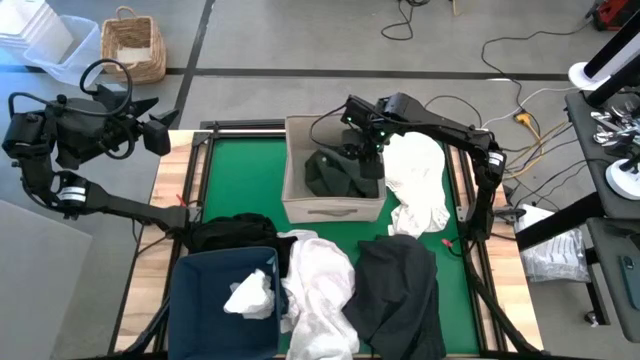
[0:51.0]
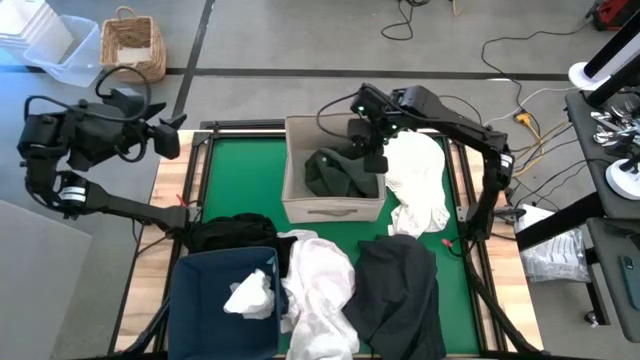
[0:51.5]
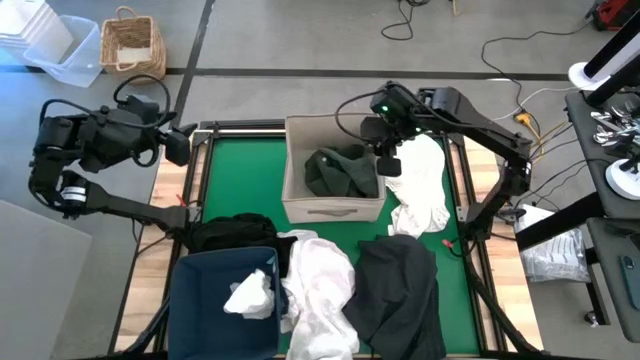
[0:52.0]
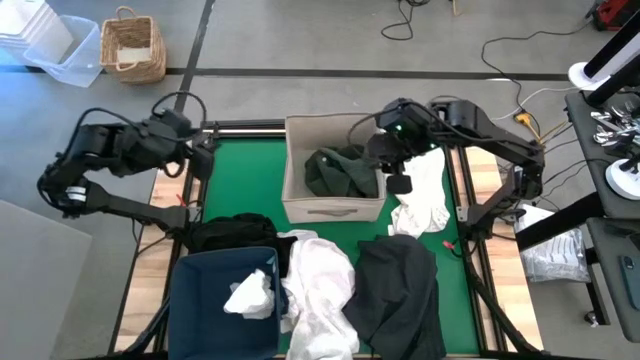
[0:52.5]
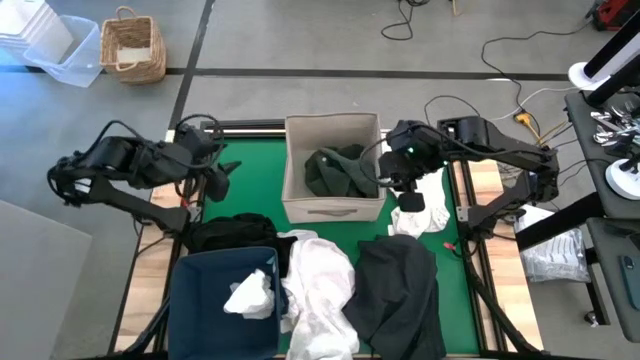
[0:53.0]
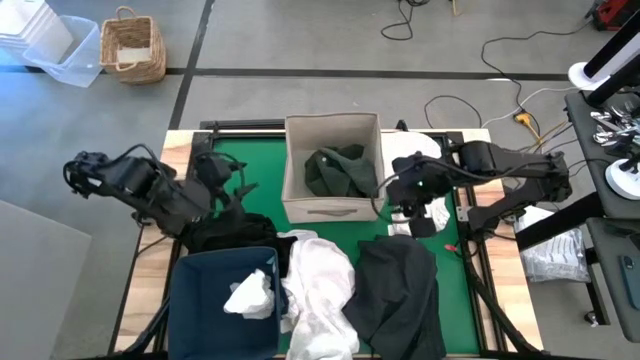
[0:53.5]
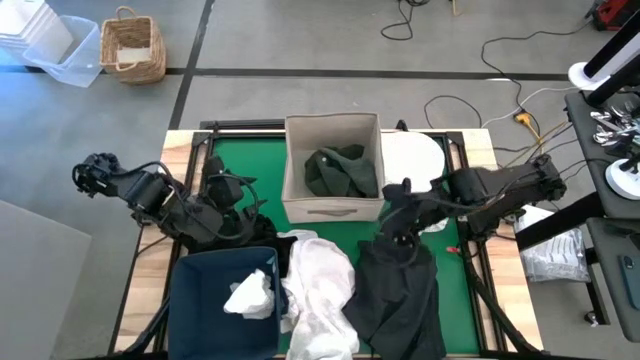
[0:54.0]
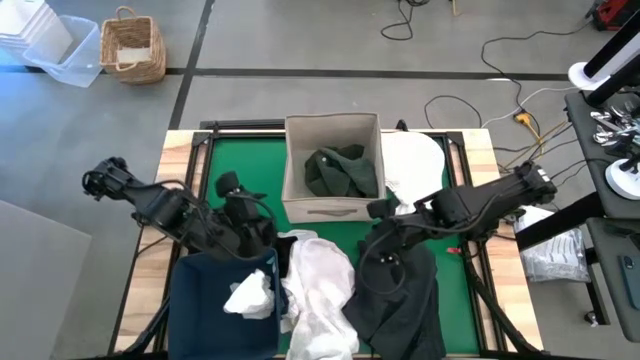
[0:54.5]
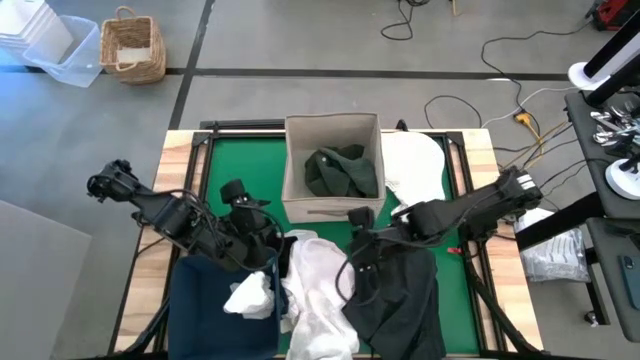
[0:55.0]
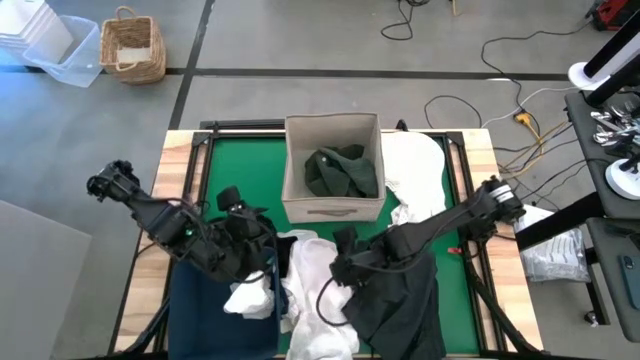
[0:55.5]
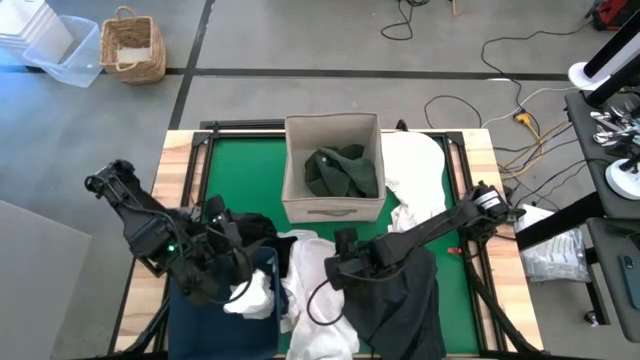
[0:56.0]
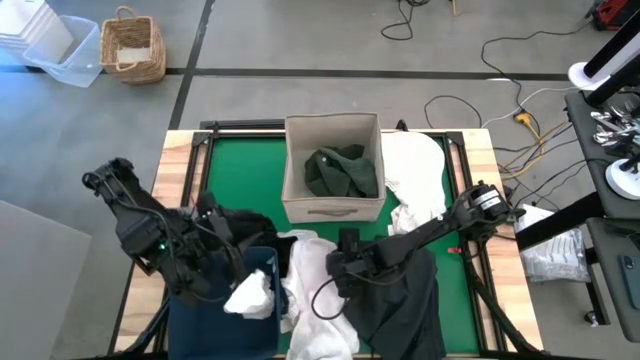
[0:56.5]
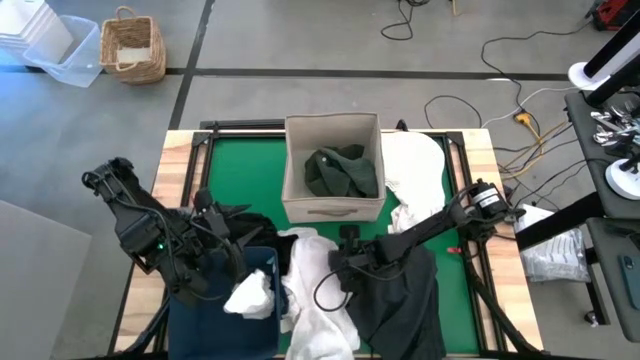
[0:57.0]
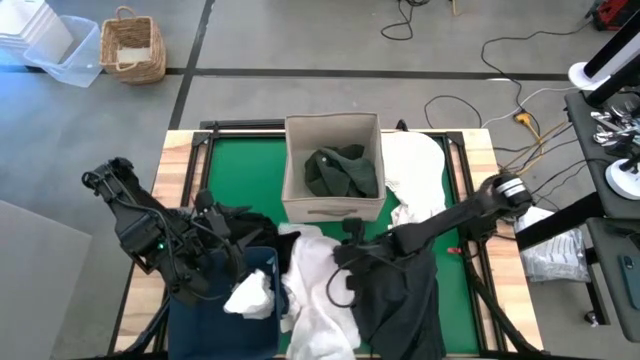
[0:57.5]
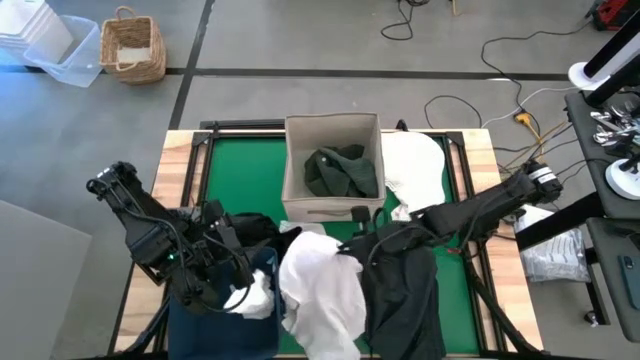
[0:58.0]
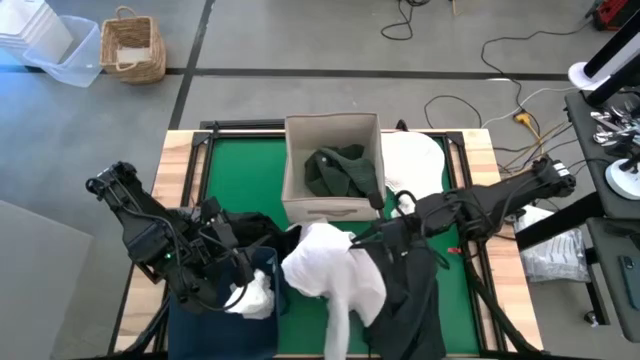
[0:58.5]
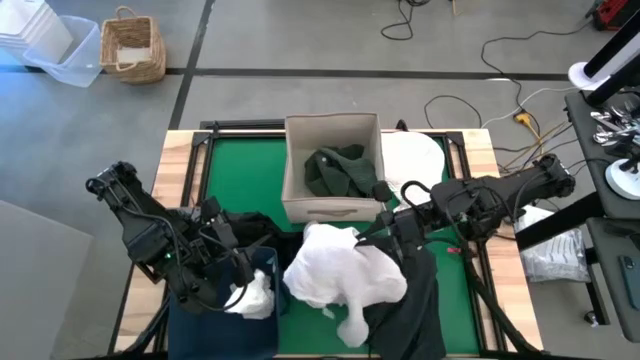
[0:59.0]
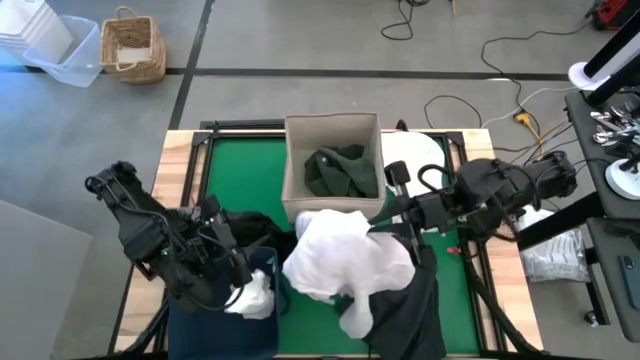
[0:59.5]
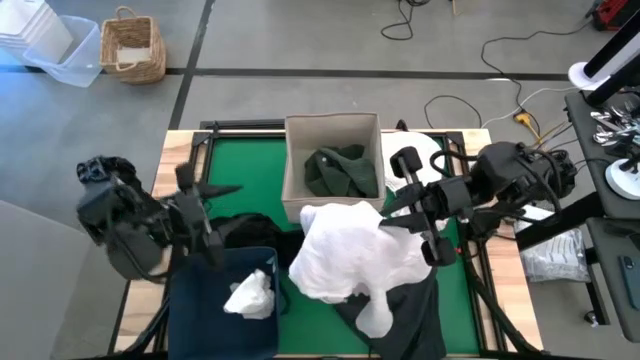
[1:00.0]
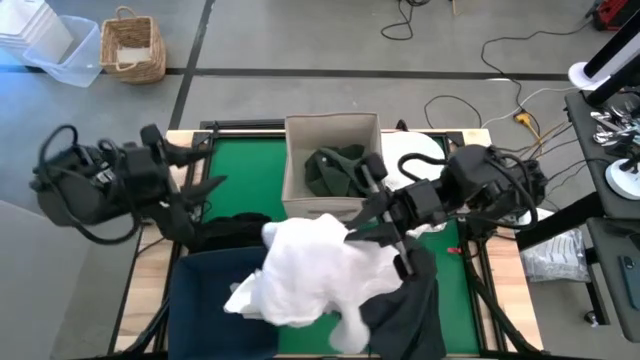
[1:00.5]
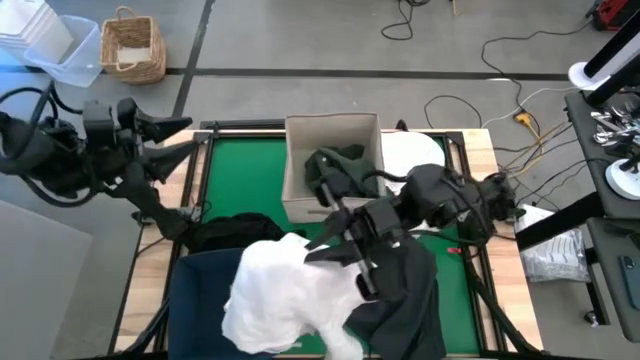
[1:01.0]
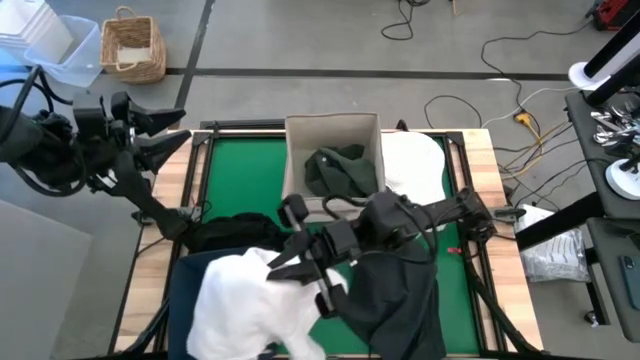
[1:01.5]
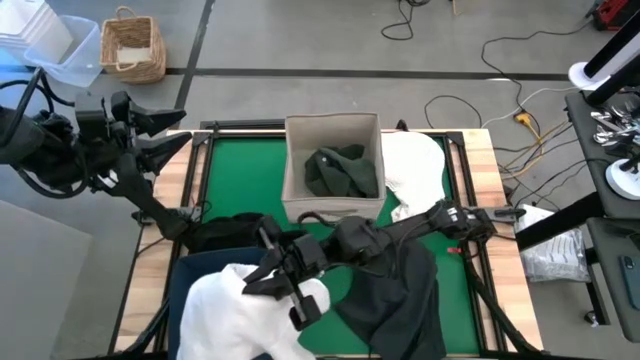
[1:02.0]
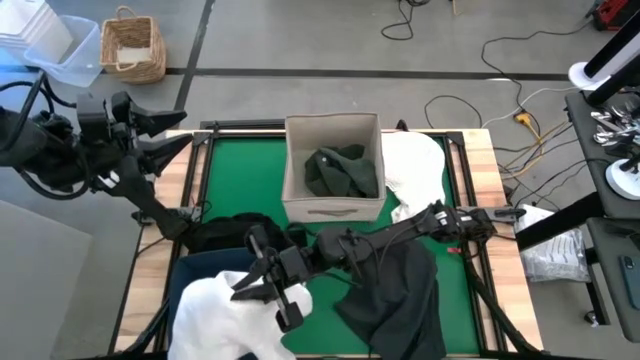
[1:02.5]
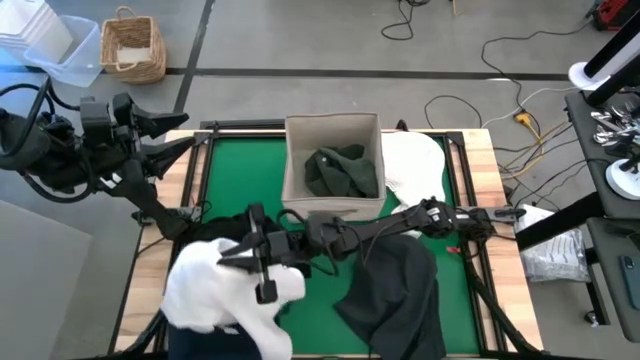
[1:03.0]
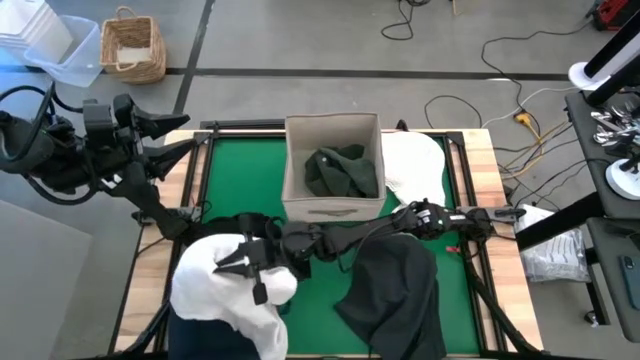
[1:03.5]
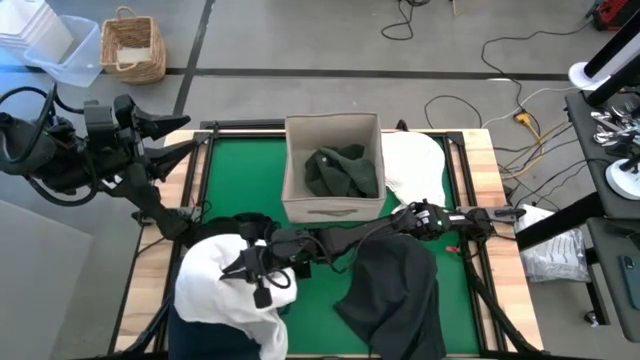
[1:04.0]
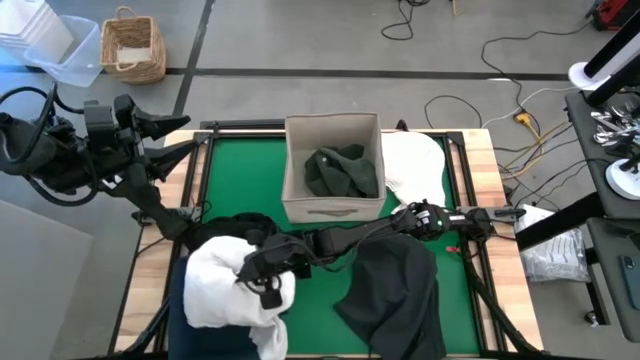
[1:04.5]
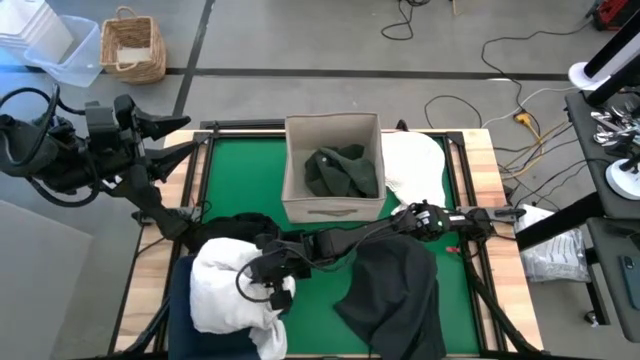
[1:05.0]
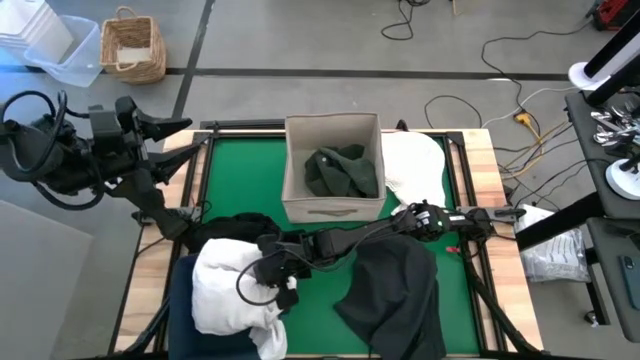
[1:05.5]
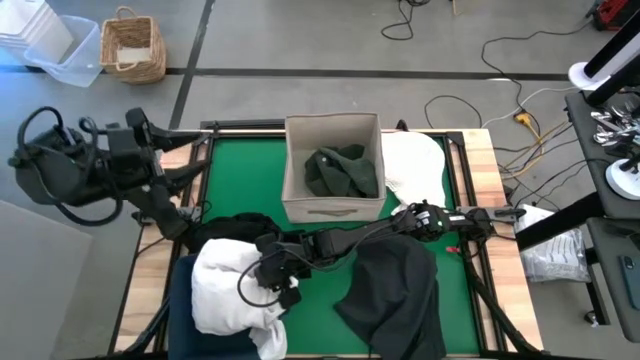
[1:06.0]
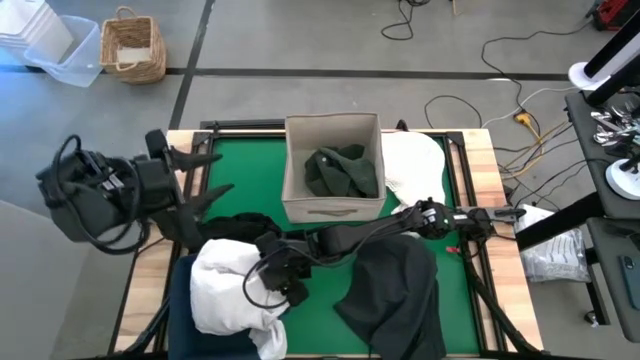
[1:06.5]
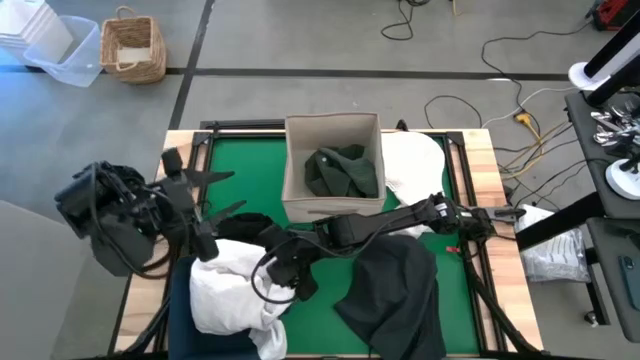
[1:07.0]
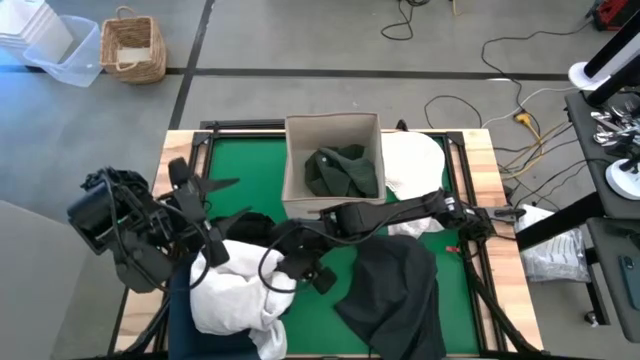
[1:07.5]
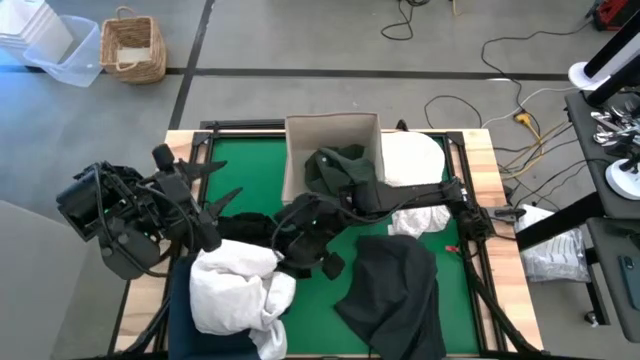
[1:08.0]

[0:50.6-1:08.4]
Put the white cloth into the blue laundry bin

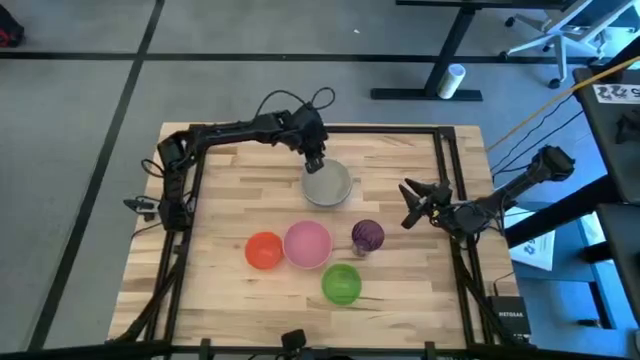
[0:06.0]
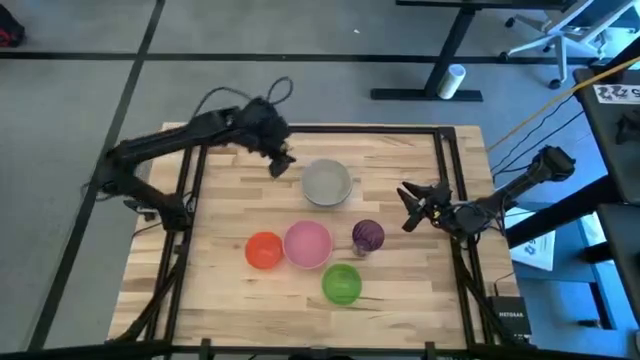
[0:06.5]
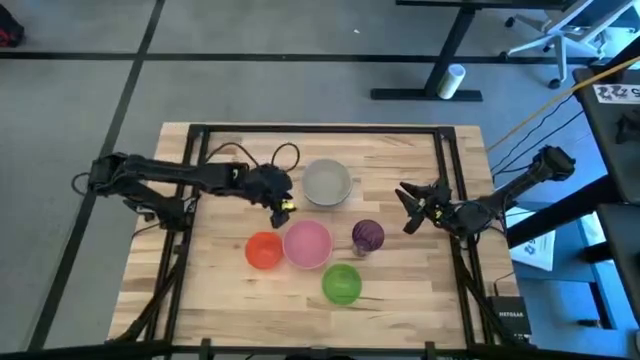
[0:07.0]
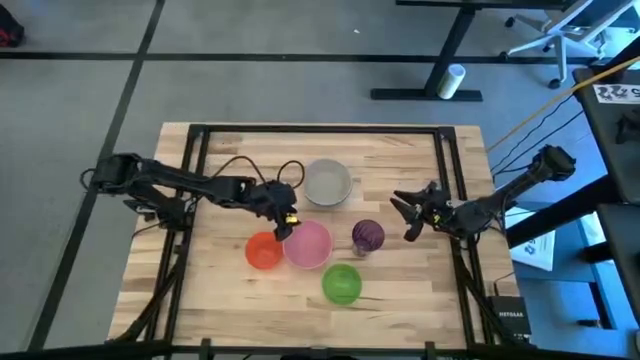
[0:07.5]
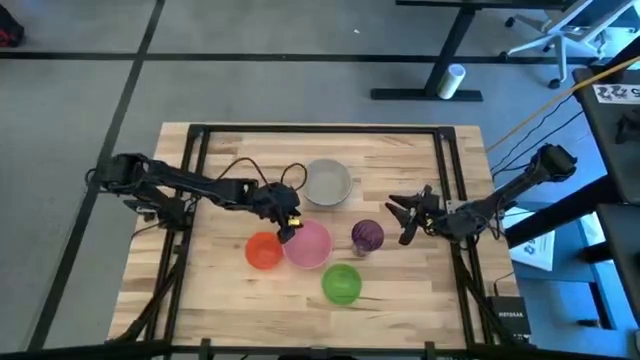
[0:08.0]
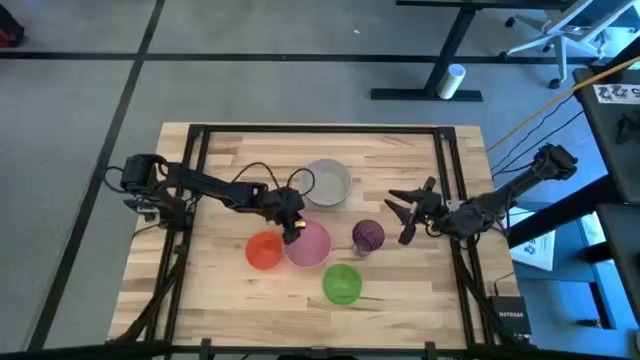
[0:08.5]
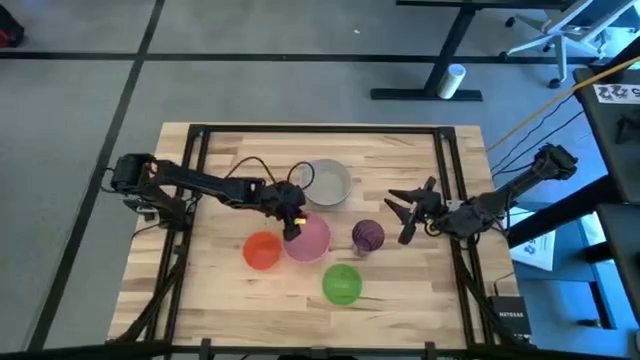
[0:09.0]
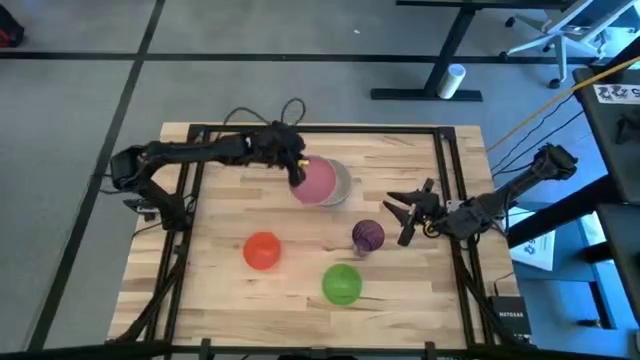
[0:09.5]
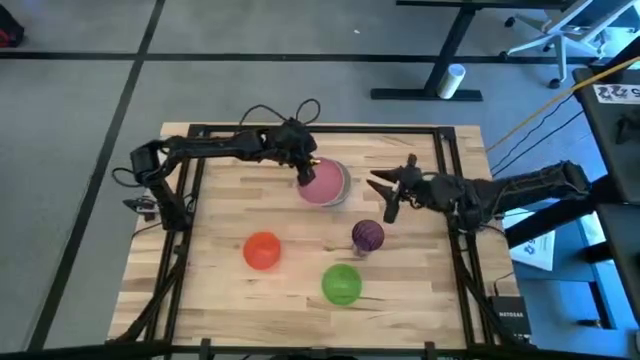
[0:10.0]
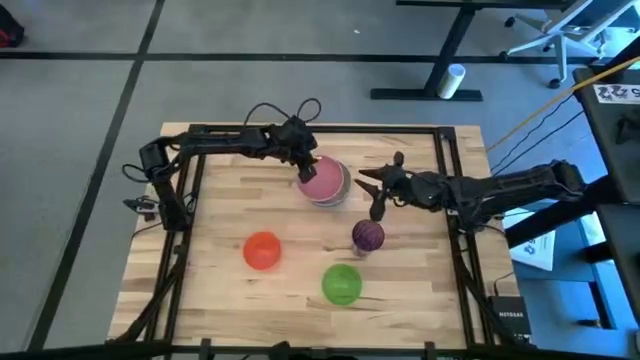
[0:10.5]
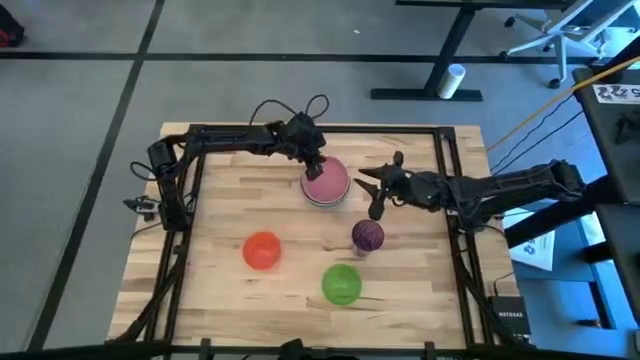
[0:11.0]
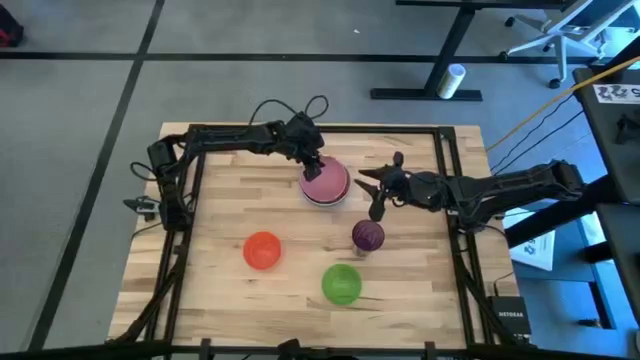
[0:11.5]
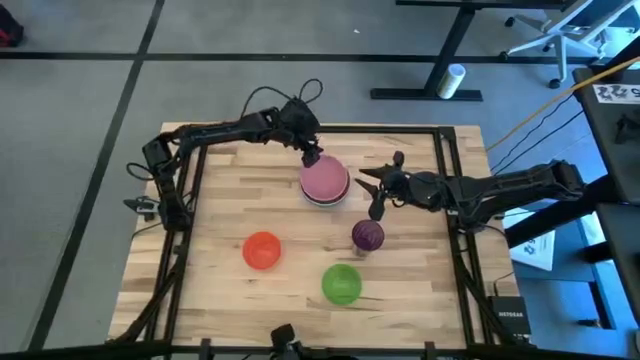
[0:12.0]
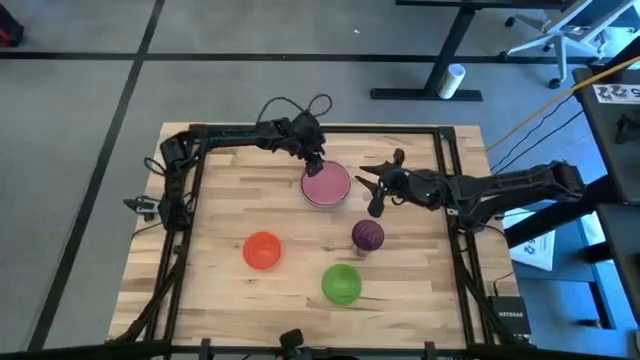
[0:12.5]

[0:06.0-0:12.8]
Stack the pink bowl on top of the gray bowl
